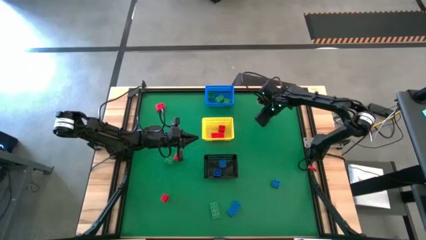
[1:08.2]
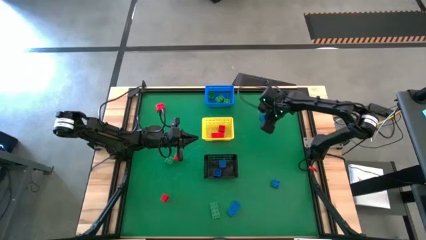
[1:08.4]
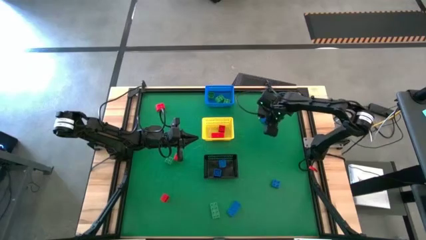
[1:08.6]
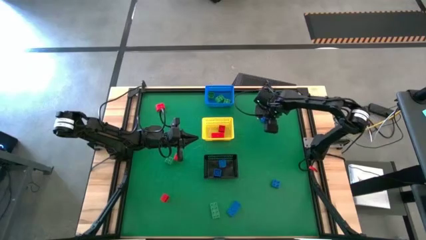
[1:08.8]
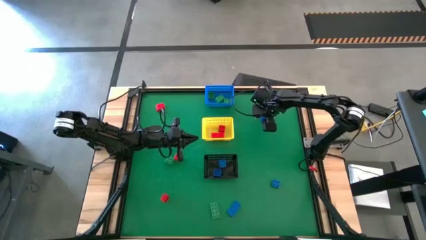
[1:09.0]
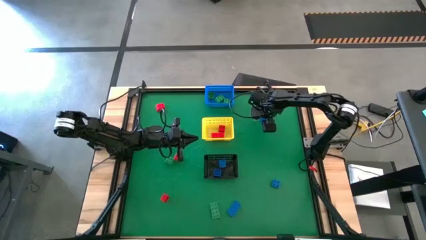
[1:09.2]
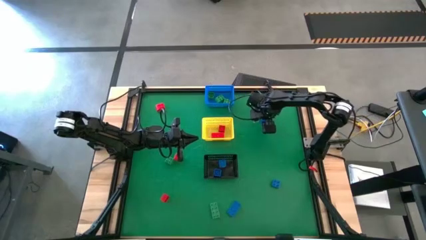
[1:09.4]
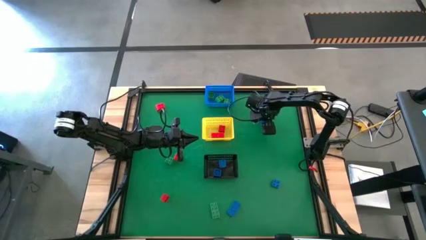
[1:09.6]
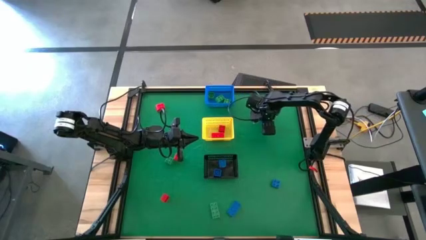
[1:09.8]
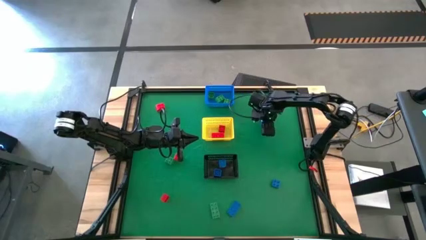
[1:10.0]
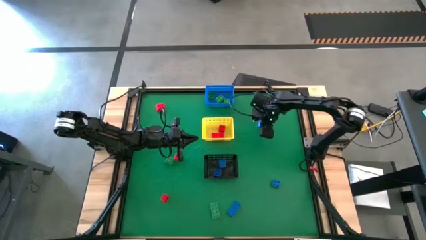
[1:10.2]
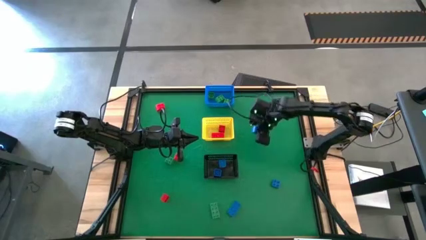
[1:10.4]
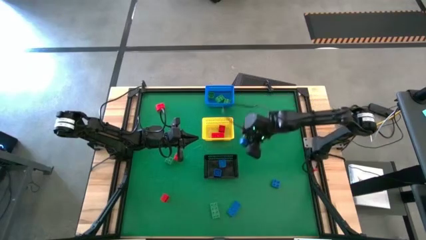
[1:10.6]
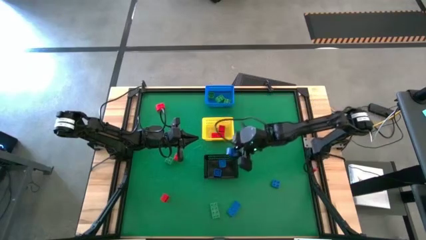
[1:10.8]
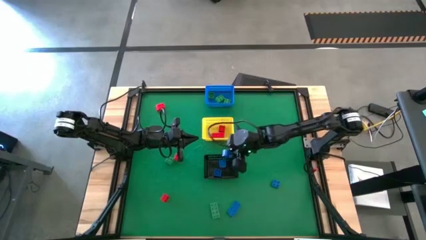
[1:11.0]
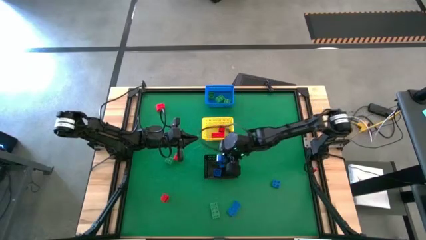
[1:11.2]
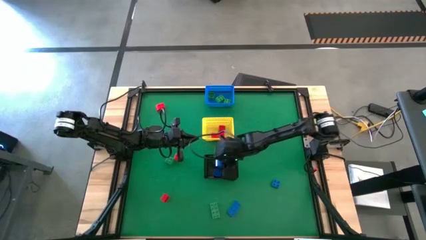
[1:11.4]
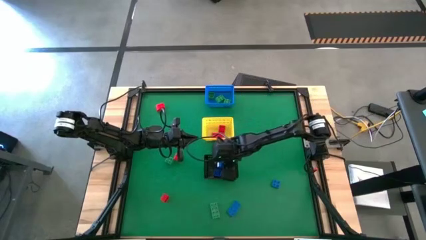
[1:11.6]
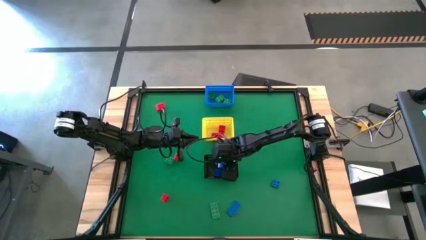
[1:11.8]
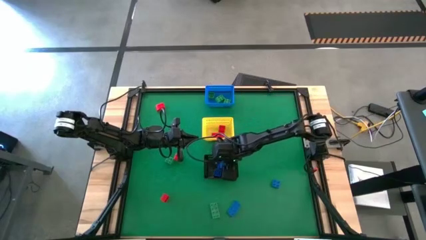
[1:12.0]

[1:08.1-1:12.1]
Task: Sort & place blocks by color
Put the blue game piece into the black bin

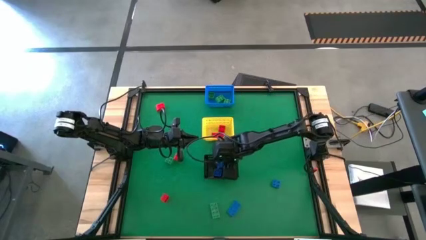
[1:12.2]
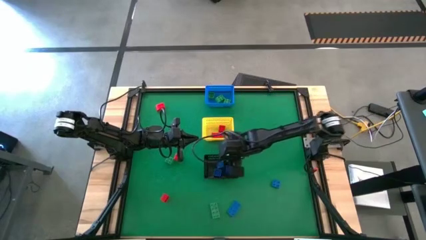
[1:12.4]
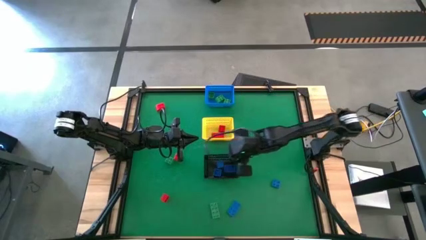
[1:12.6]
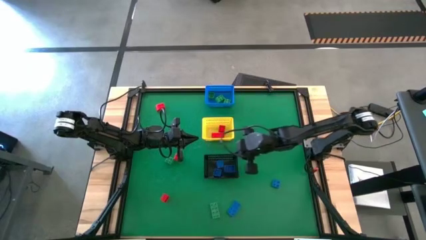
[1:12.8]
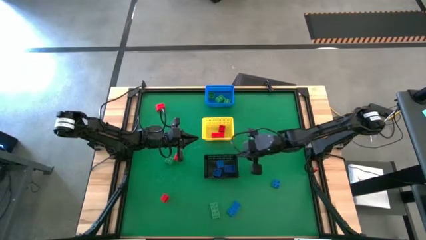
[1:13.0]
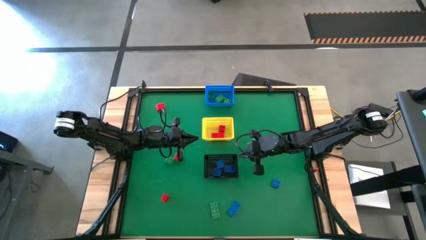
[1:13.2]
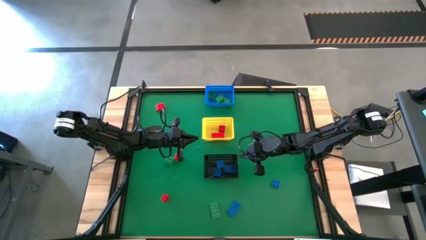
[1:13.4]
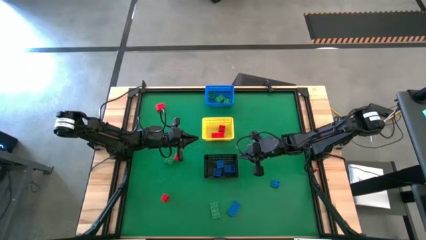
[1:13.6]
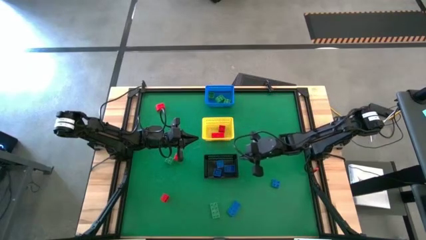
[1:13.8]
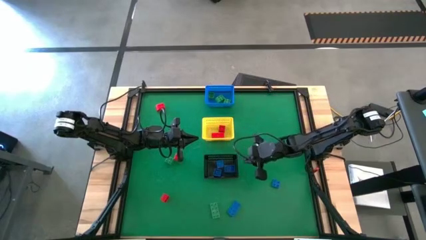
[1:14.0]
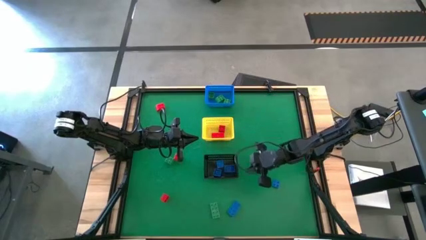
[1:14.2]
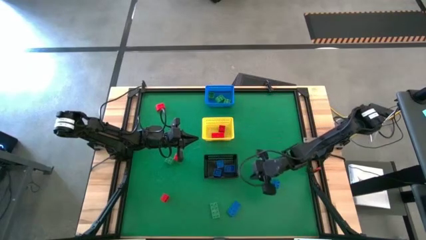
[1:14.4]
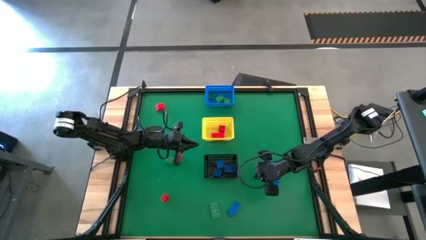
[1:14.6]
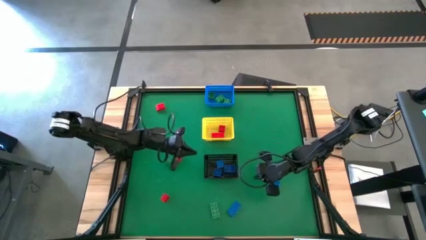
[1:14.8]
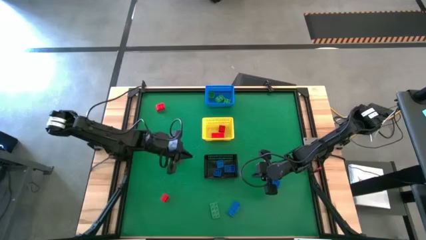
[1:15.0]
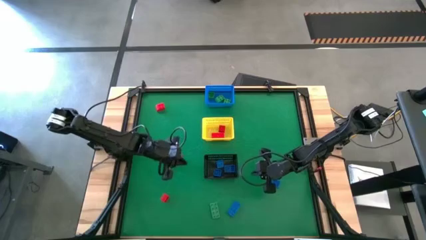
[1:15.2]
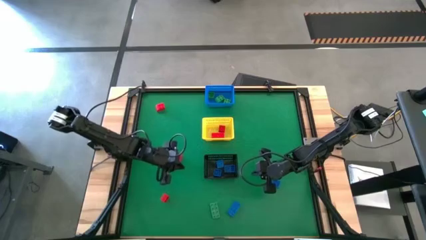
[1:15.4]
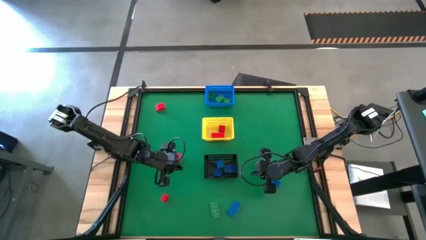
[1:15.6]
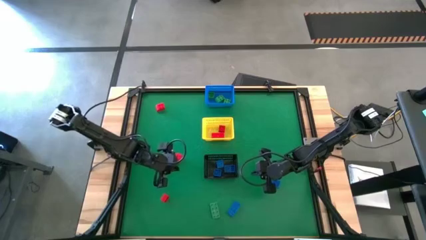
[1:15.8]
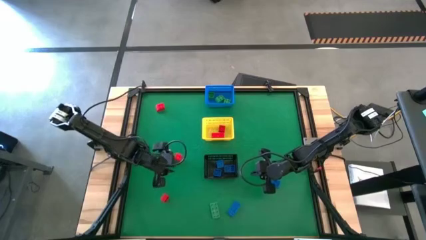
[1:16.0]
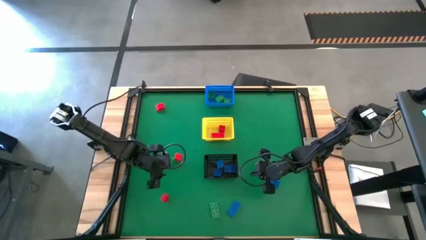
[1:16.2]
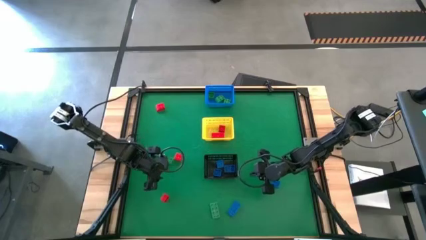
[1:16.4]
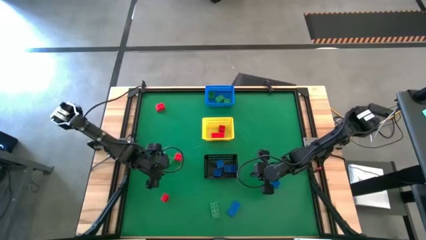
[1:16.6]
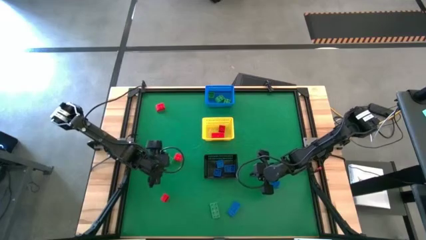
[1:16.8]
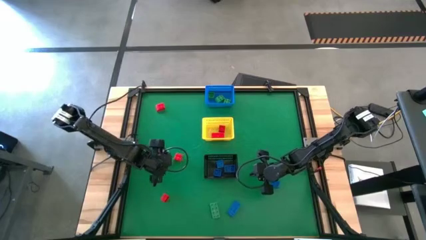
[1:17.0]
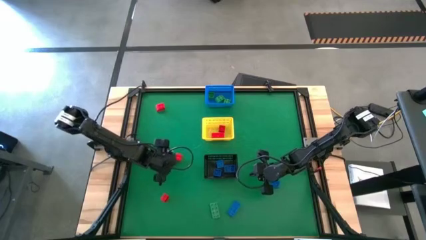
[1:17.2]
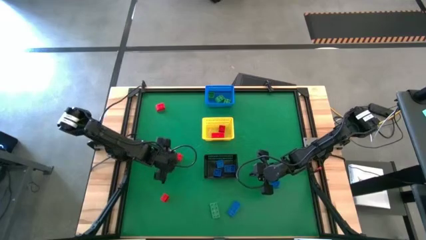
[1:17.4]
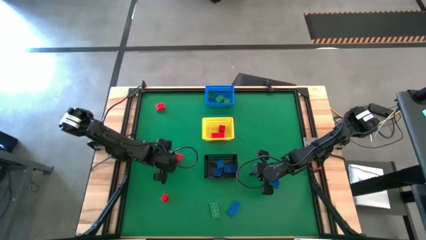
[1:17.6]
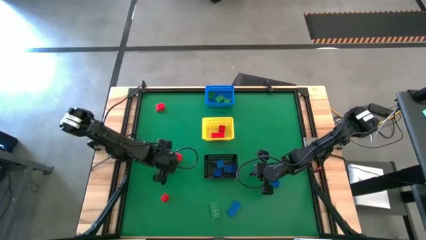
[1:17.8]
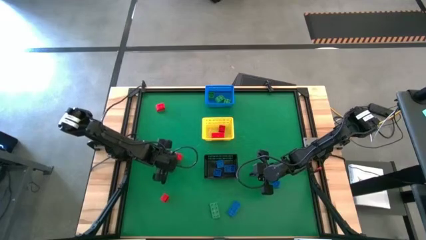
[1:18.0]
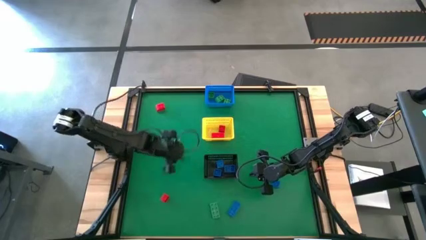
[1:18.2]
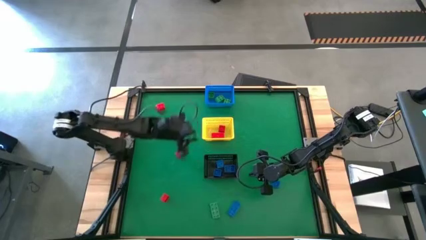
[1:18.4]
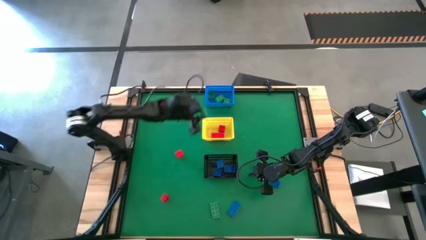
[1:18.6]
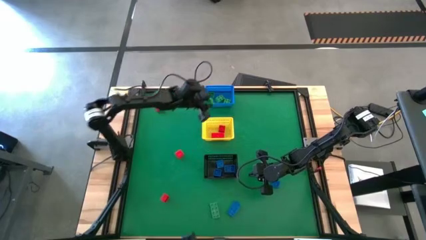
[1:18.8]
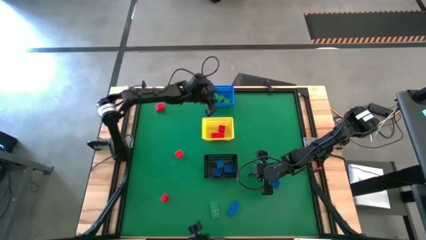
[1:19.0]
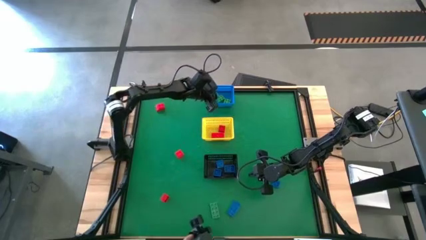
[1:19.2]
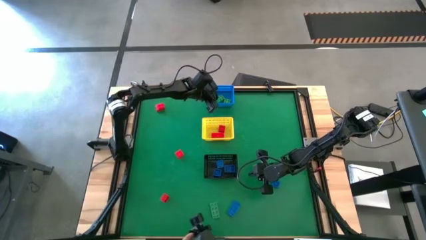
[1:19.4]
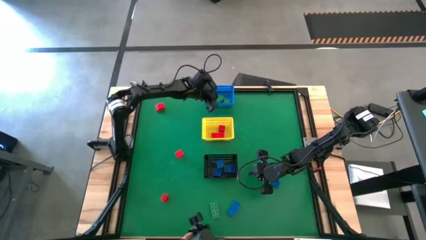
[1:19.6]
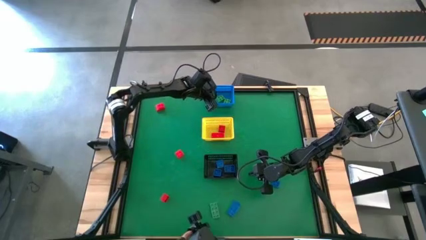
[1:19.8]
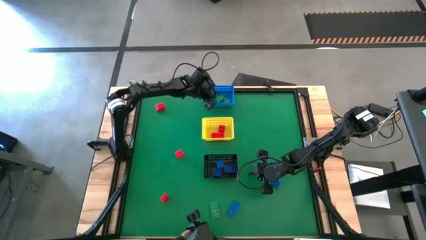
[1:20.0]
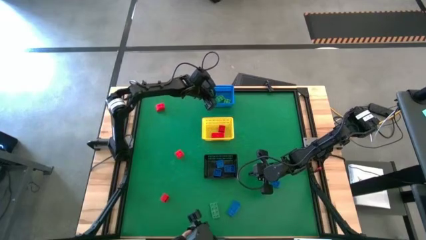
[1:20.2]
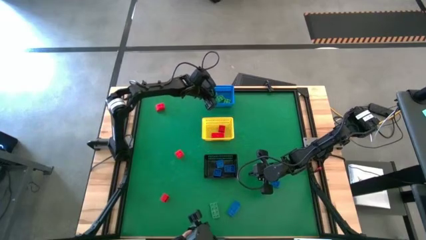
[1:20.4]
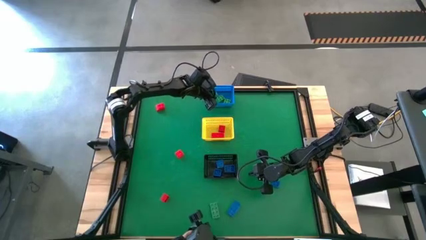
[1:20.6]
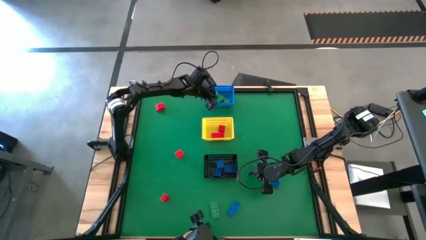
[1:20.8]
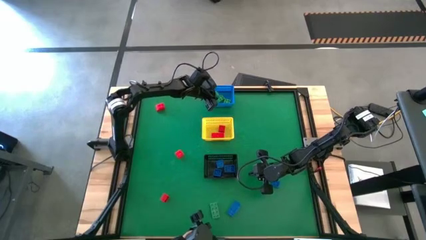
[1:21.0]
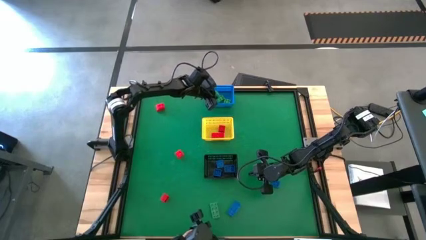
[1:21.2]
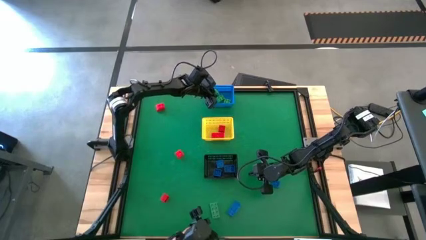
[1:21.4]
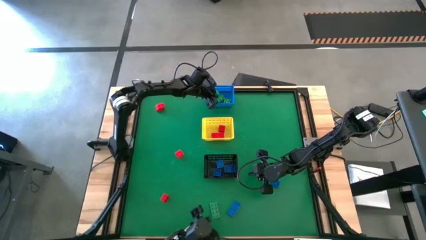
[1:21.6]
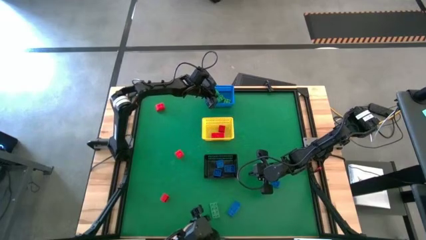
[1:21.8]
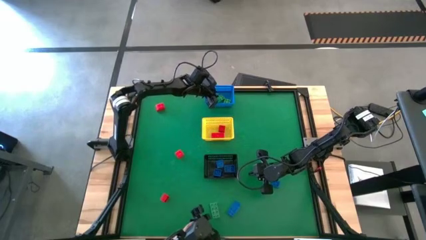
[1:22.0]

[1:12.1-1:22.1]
Put the green game piece into the blue bin

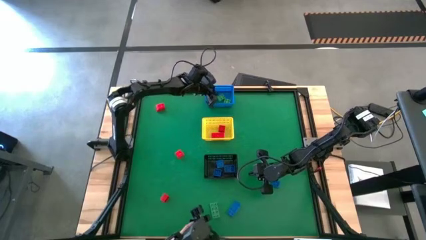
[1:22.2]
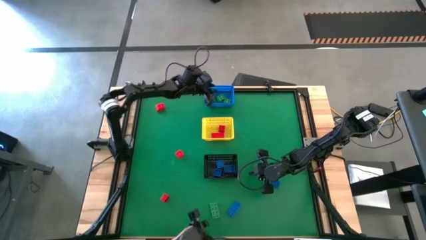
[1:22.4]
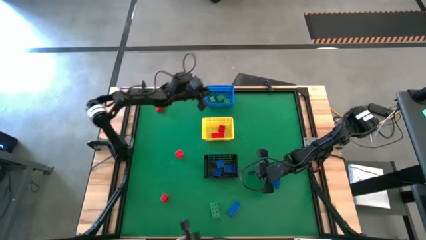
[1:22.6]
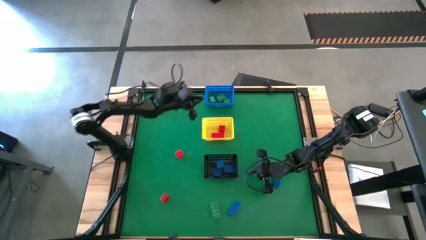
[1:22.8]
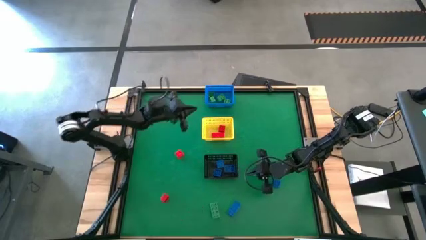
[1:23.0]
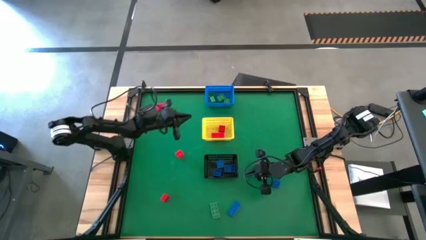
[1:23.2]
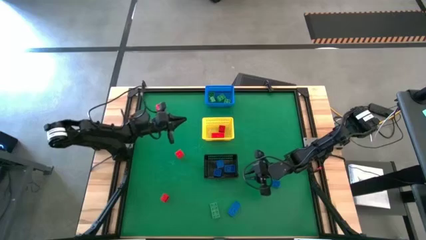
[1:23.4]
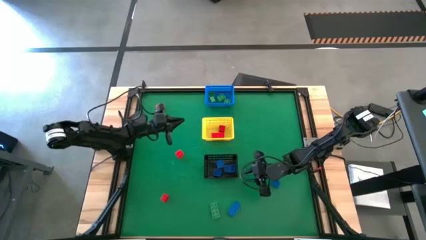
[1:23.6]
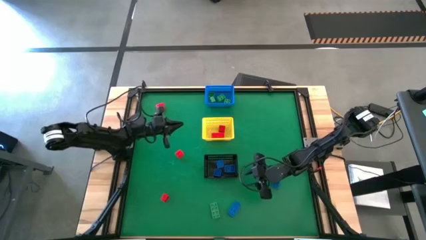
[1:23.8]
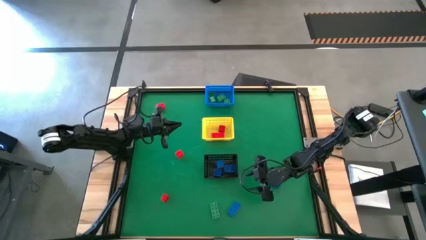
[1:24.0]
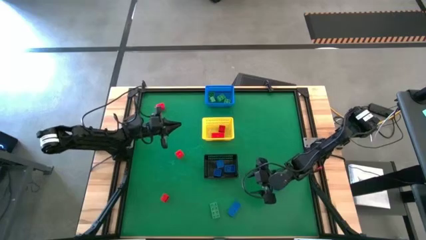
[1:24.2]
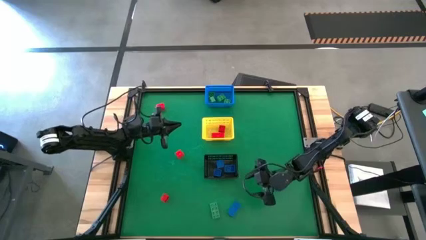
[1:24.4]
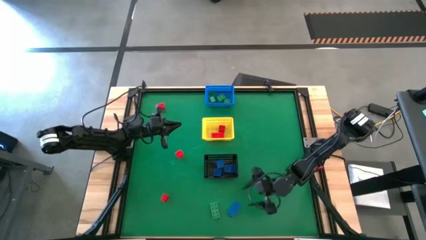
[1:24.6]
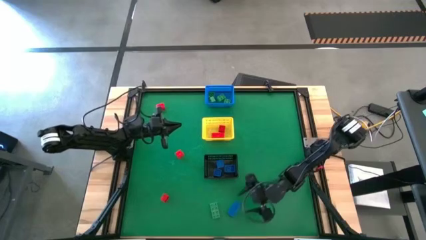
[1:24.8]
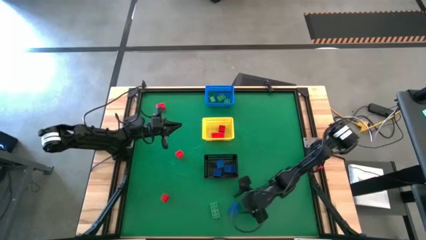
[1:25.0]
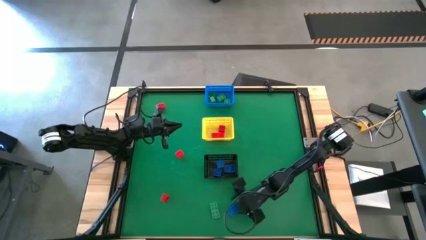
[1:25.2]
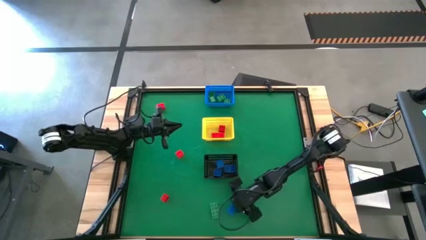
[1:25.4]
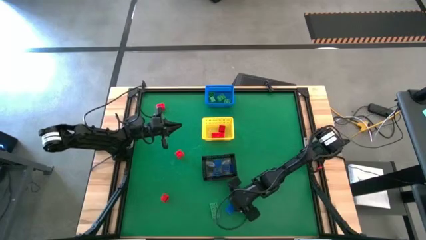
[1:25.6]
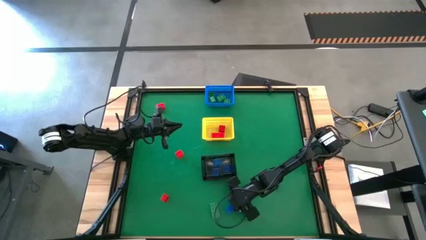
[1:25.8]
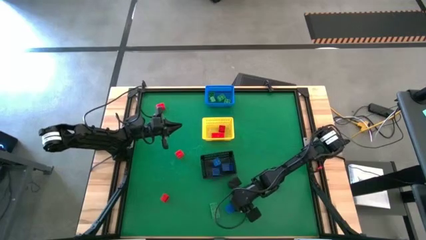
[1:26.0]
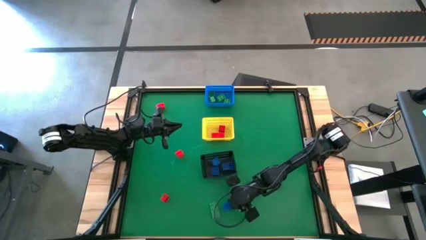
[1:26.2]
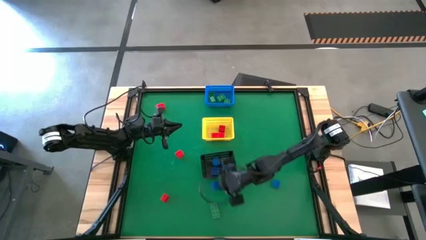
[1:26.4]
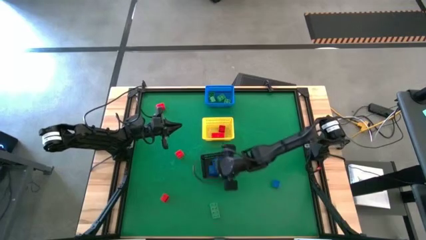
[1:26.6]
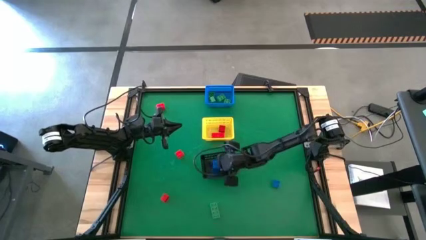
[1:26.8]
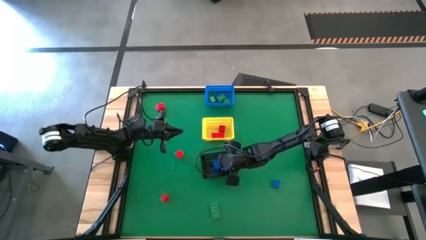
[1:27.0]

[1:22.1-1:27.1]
Put the blue game piece into the black bin
